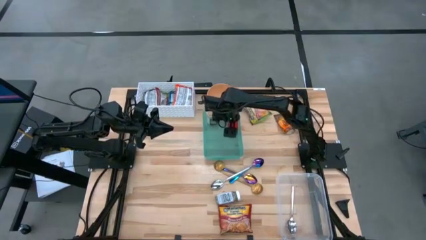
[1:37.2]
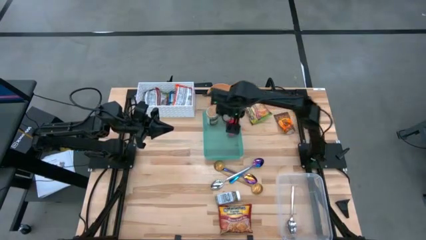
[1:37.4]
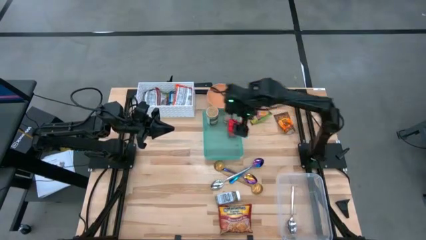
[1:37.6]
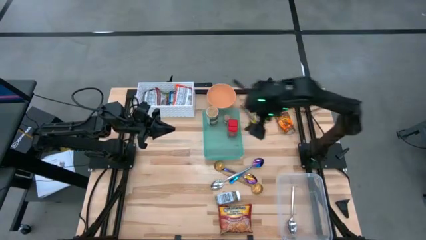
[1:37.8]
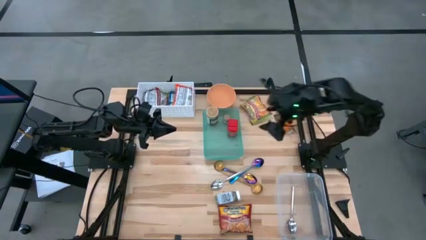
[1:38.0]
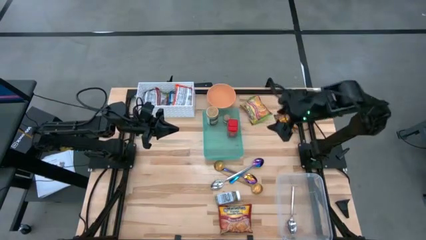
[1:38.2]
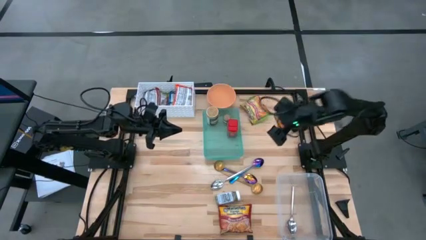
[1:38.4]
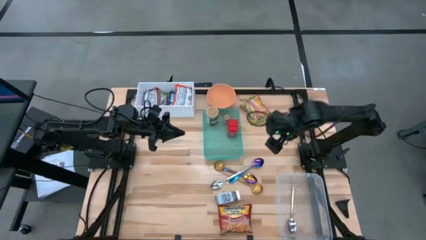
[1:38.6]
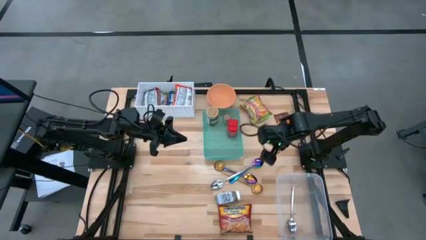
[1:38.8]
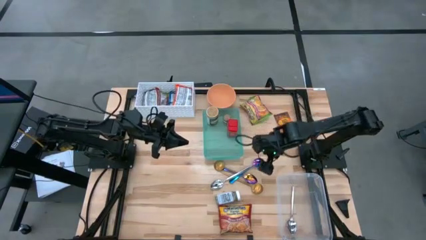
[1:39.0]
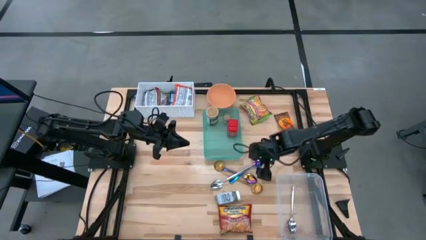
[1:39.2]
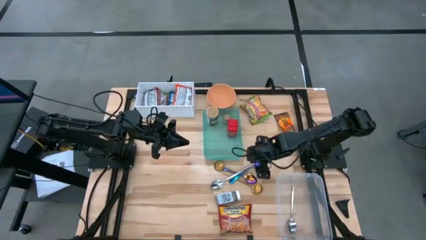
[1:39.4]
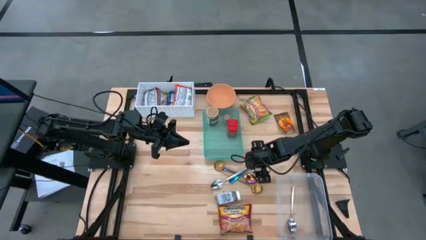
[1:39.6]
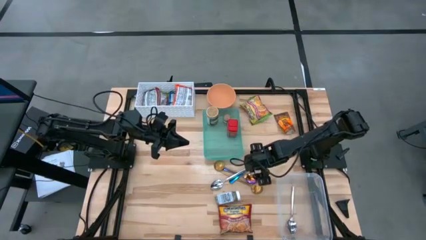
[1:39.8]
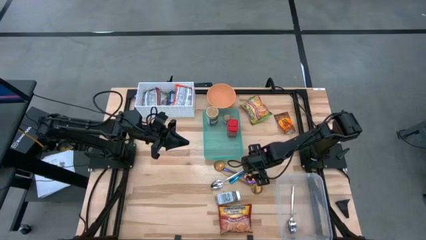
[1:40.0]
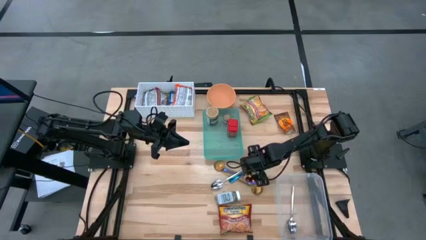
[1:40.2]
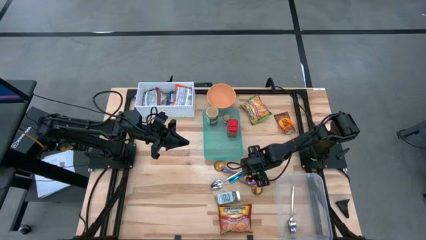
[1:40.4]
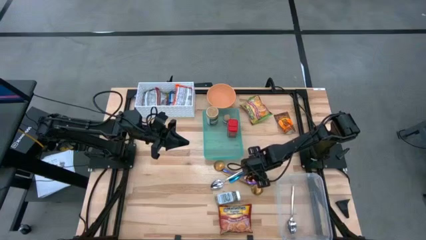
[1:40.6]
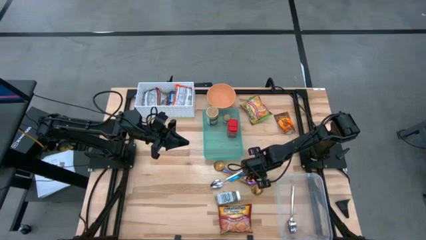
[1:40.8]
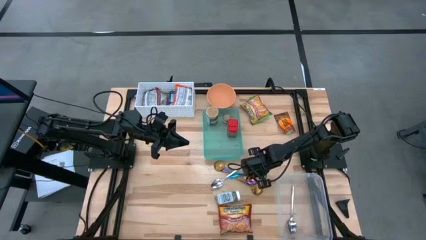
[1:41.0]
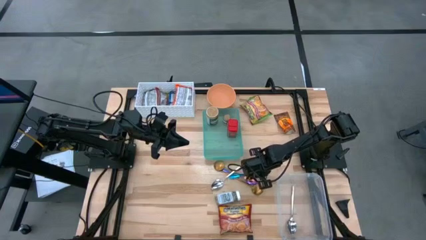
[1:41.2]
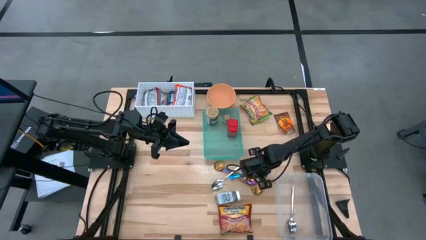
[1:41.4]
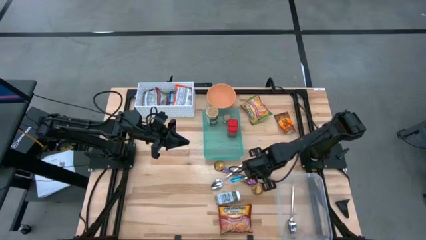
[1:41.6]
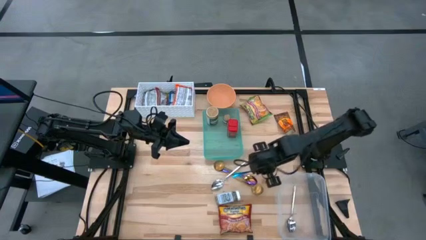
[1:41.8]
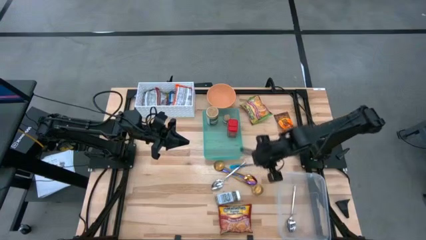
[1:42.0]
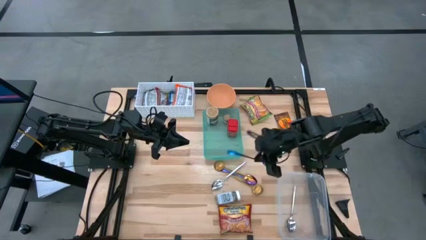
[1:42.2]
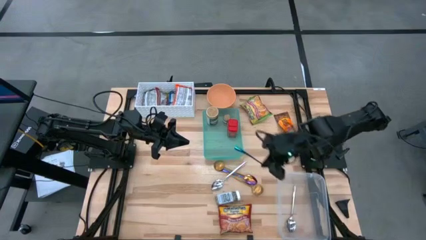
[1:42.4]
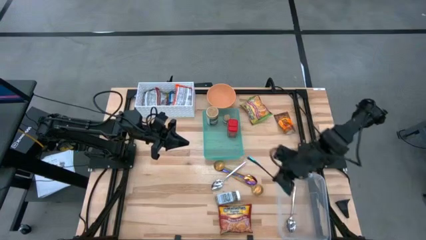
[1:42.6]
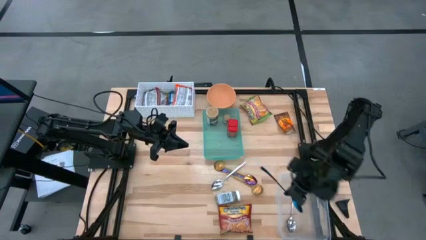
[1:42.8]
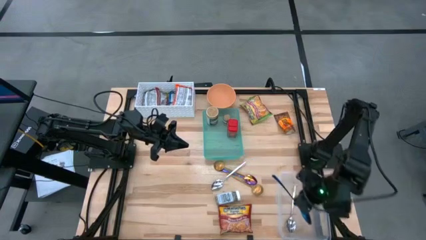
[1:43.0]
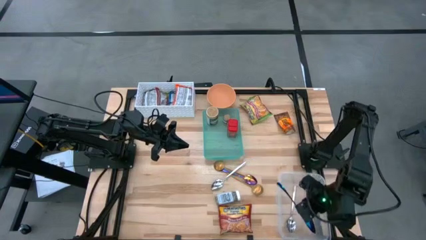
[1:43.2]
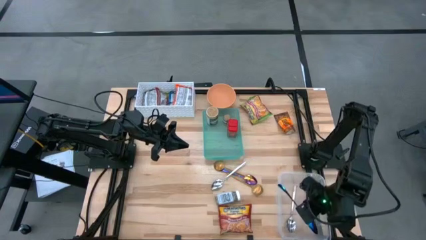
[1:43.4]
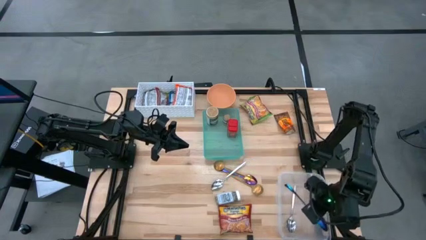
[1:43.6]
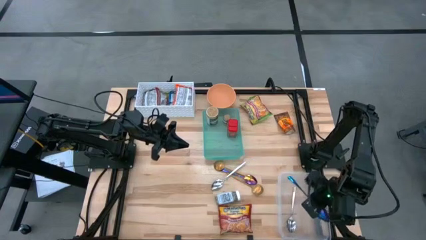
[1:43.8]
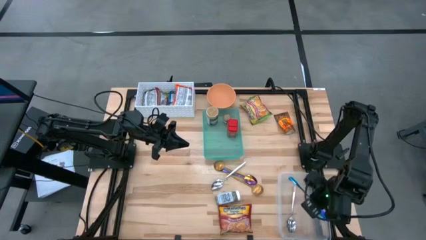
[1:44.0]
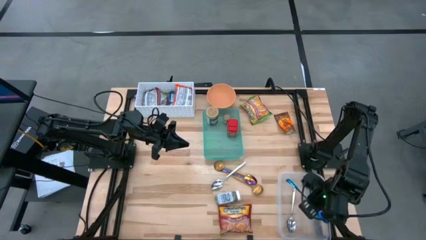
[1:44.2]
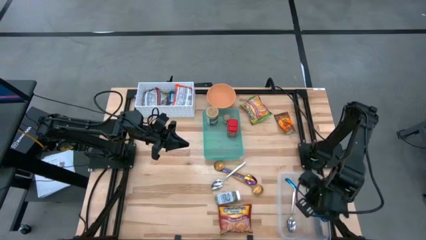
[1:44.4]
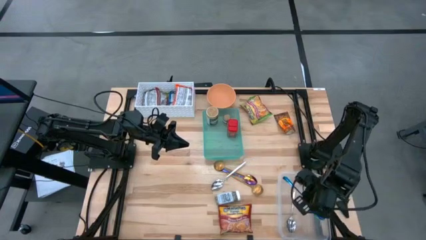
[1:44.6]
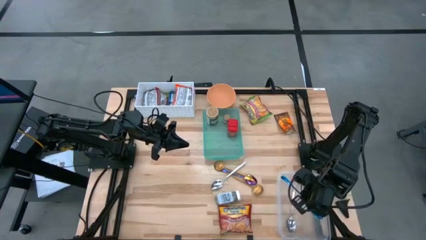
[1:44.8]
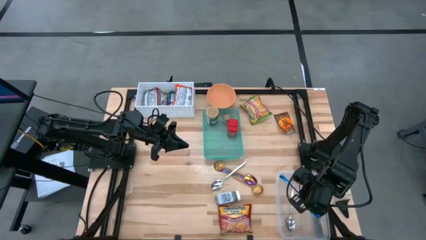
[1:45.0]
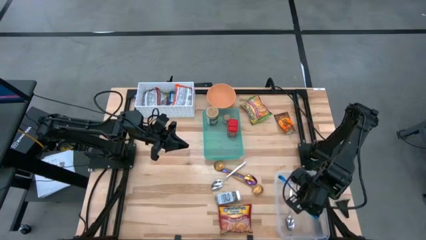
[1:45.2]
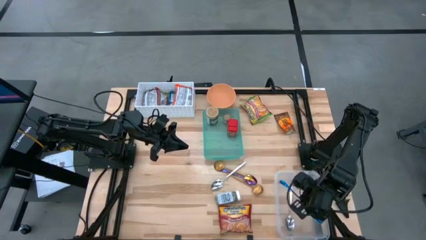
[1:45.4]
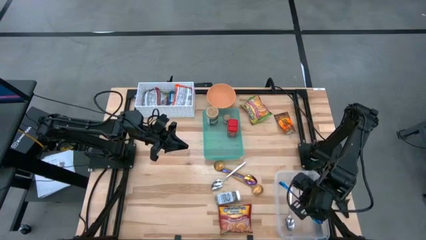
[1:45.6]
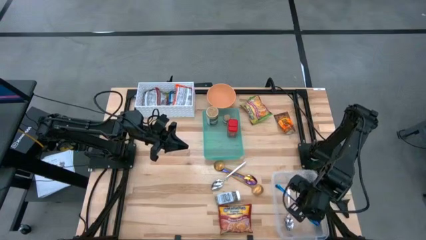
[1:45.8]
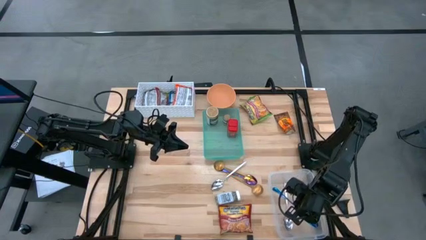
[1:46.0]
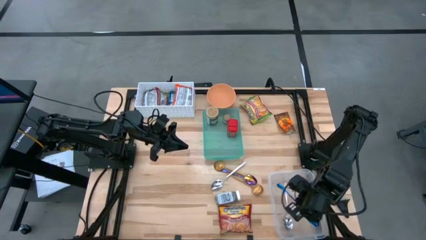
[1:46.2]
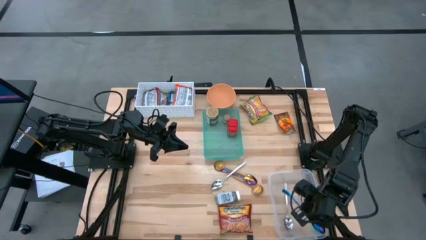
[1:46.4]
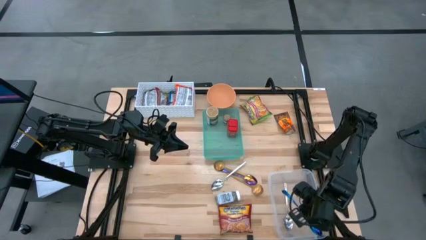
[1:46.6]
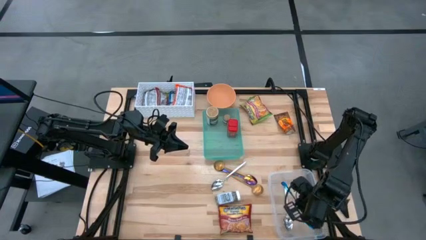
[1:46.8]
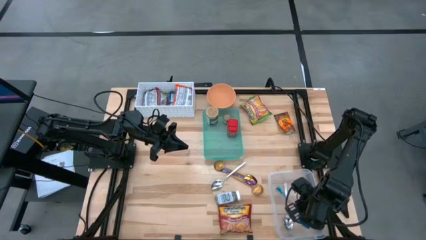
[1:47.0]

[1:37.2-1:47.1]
Task: Pick & Place Food Item
Put the top blue spoon into the transparent bin

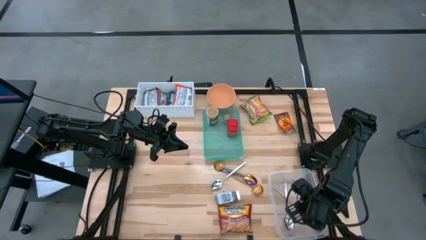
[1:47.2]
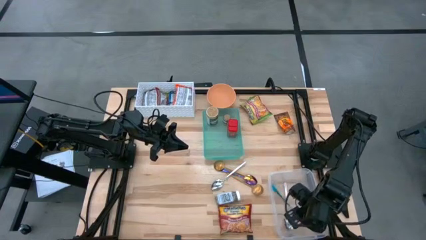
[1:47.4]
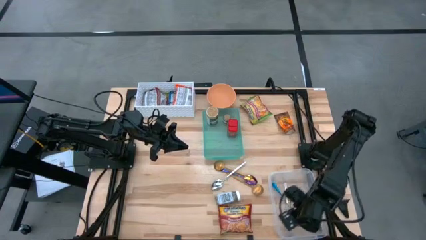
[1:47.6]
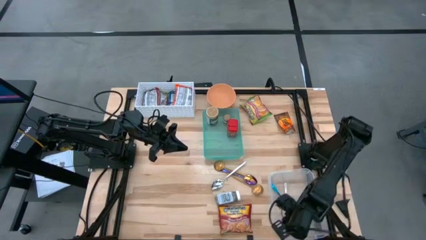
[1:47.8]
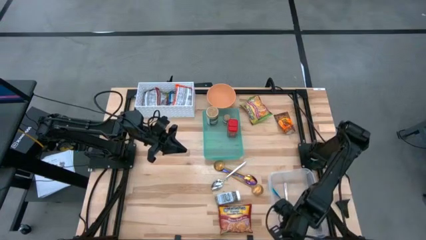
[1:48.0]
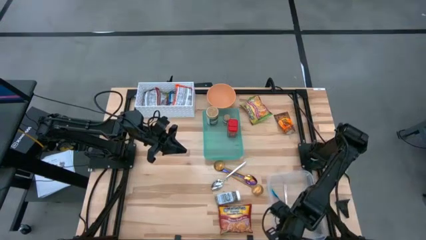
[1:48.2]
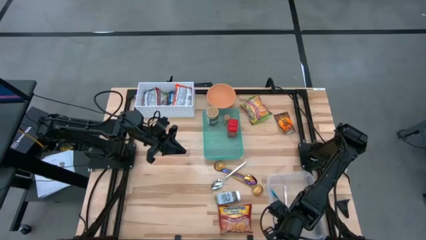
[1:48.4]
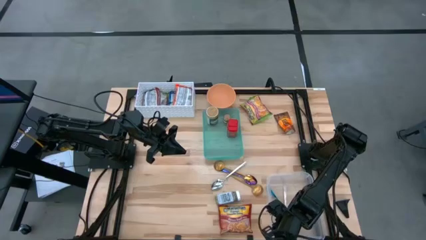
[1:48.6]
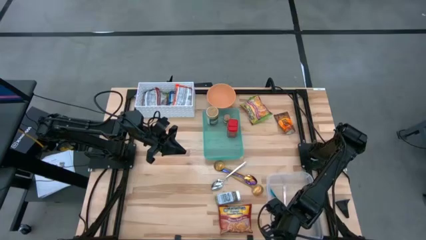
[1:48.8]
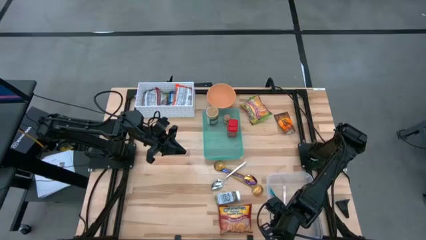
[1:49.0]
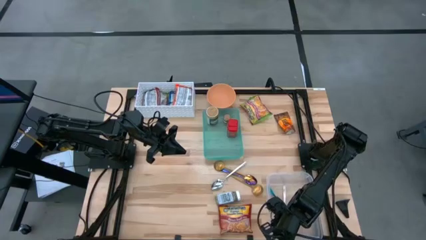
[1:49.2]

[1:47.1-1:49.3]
Adjust the white transparent bin

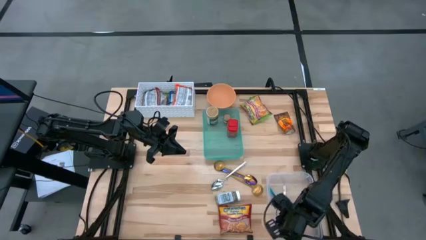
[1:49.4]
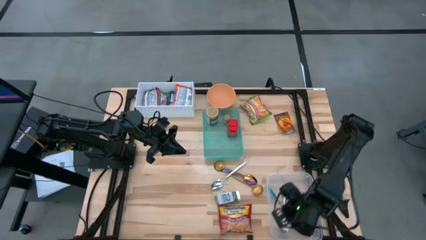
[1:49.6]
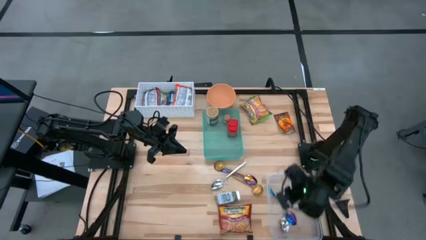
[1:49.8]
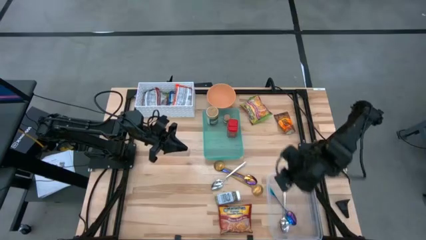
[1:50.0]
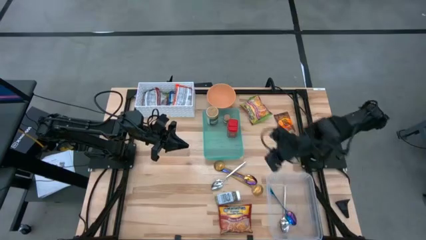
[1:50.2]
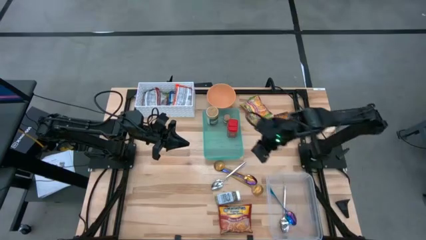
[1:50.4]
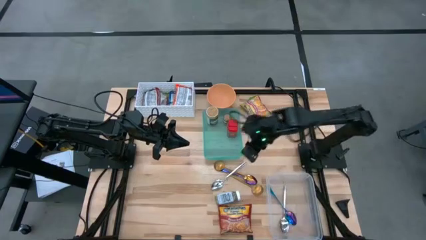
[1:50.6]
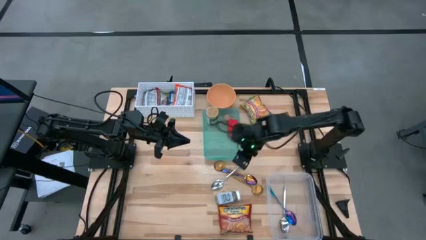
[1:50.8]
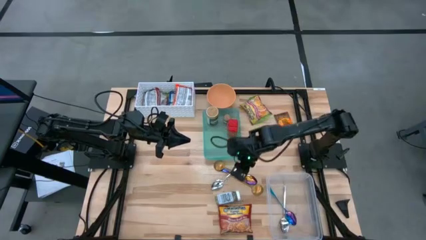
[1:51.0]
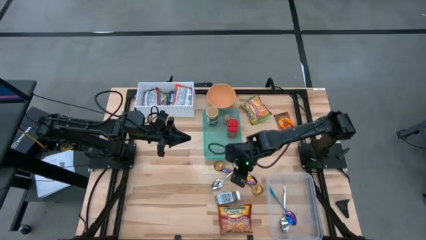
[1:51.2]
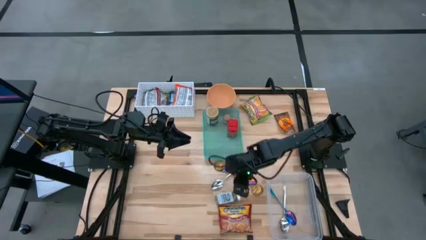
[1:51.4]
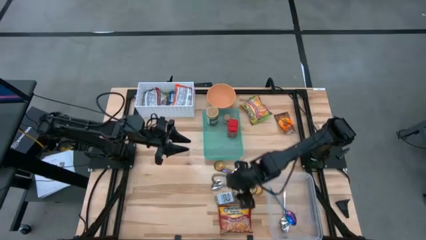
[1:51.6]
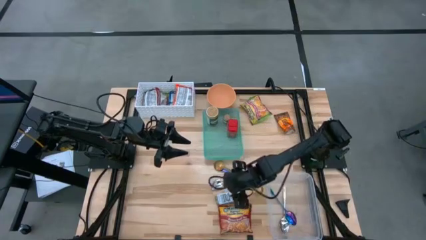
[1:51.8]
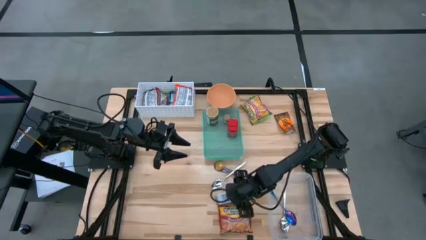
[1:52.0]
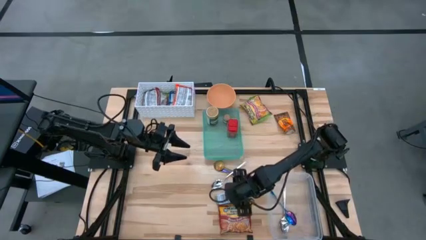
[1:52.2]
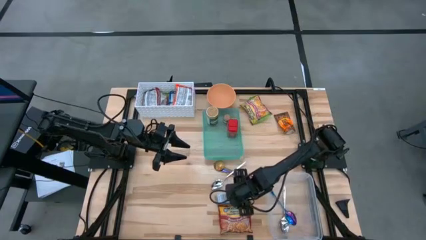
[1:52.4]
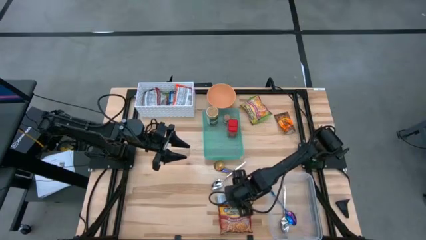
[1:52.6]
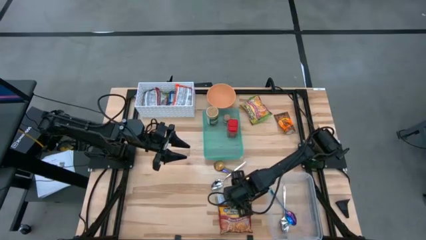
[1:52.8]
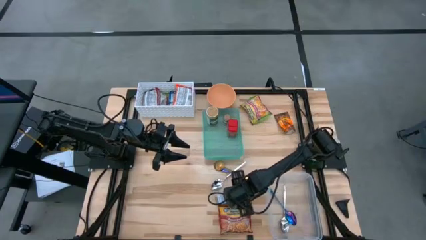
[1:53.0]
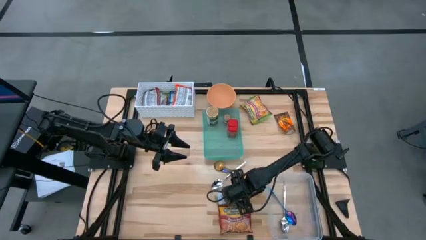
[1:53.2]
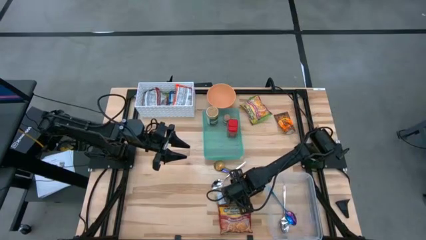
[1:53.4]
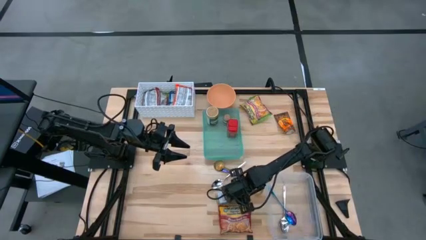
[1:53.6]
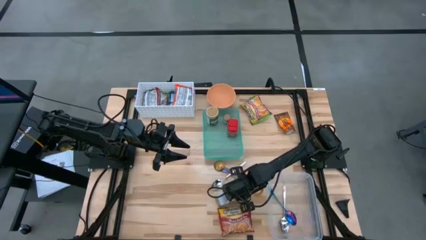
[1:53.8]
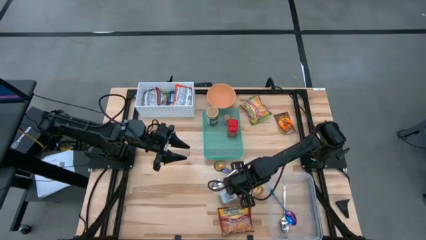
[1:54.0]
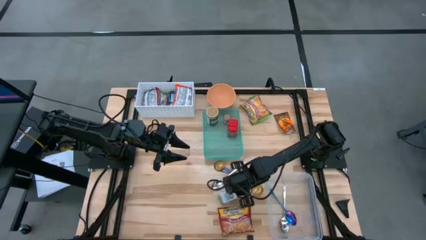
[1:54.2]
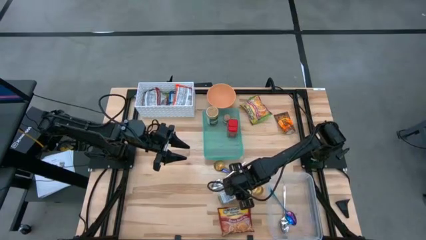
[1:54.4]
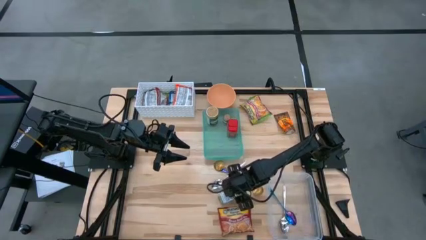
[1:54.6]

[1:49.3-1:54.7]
Put the white seasoning into the blue bin
